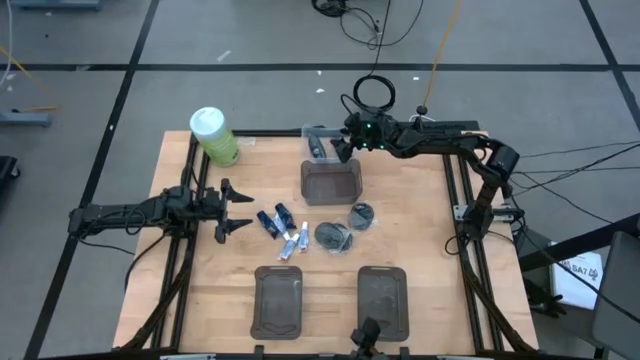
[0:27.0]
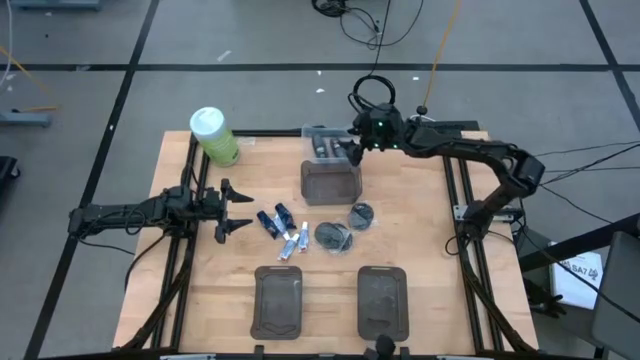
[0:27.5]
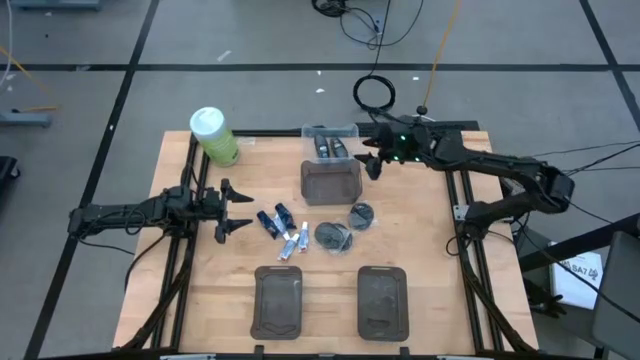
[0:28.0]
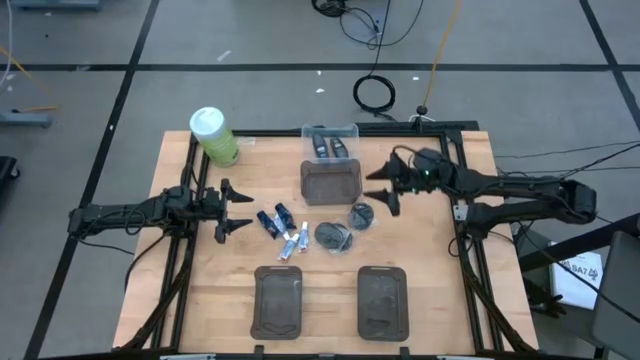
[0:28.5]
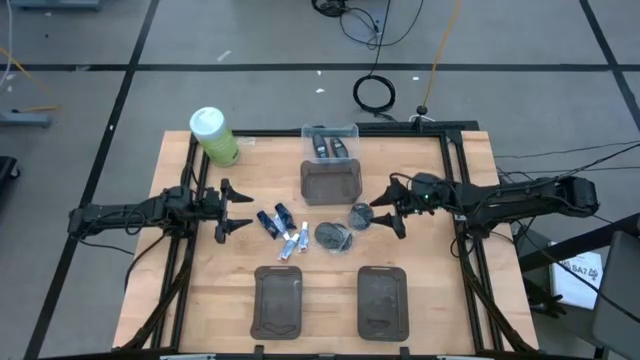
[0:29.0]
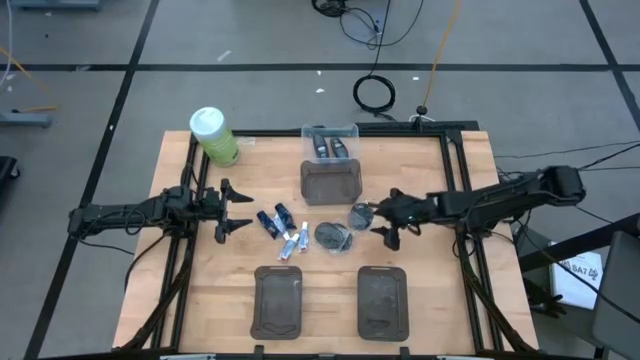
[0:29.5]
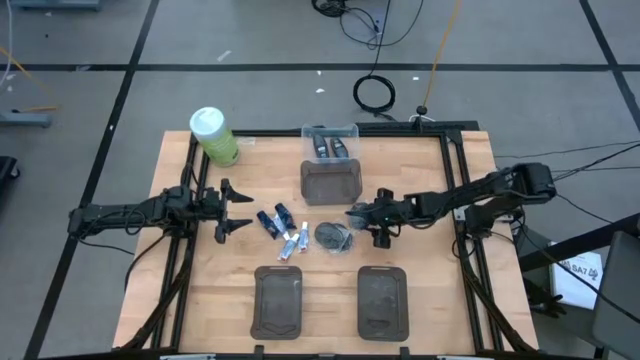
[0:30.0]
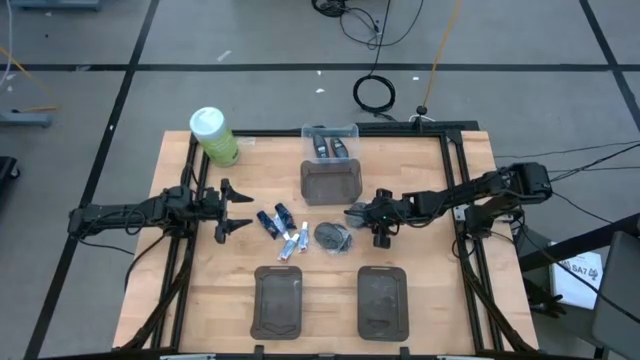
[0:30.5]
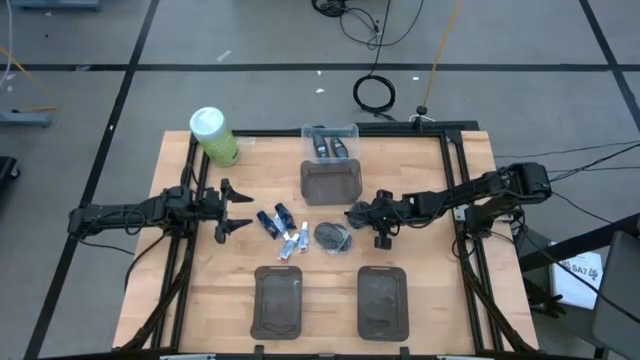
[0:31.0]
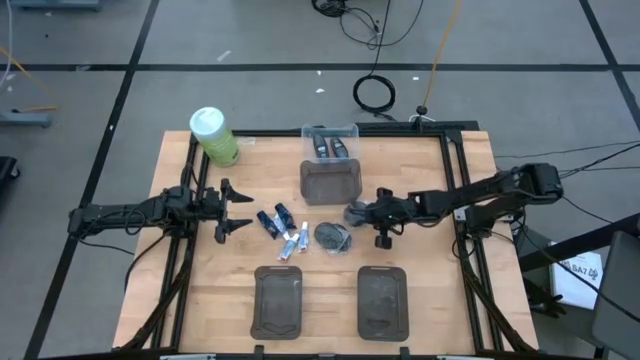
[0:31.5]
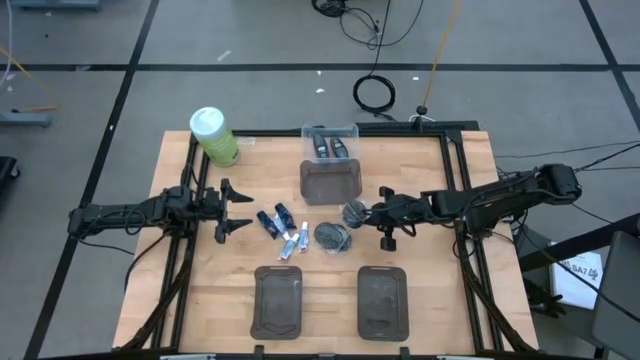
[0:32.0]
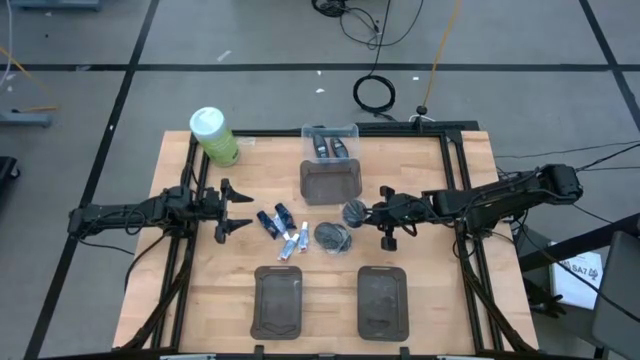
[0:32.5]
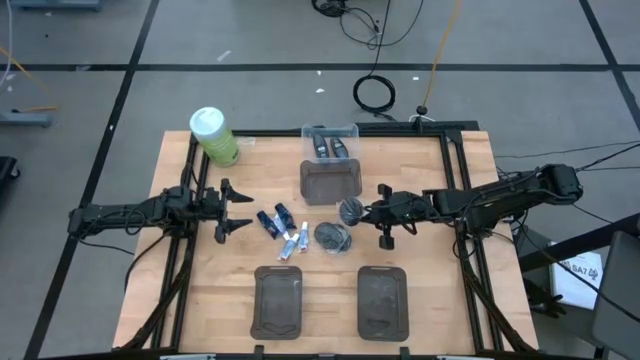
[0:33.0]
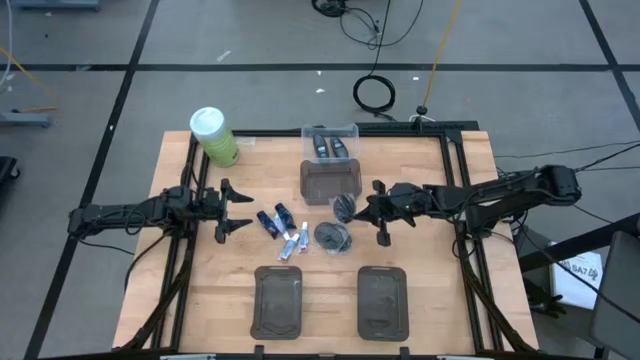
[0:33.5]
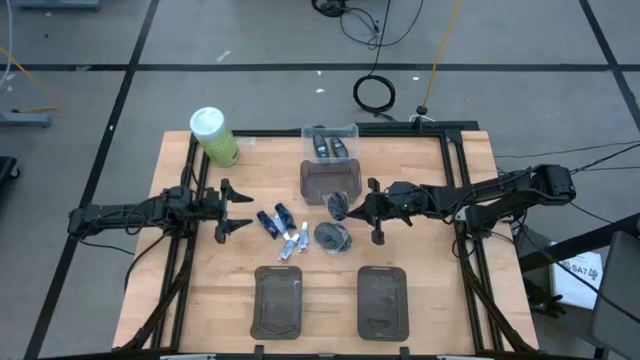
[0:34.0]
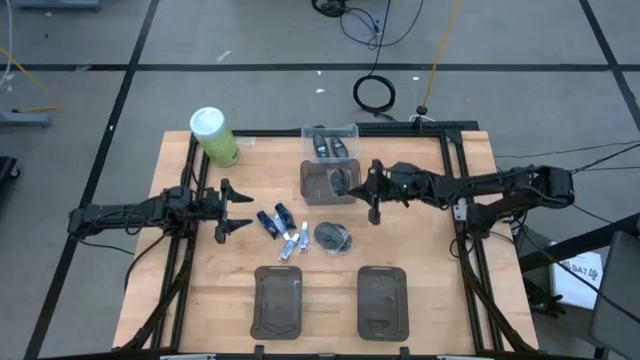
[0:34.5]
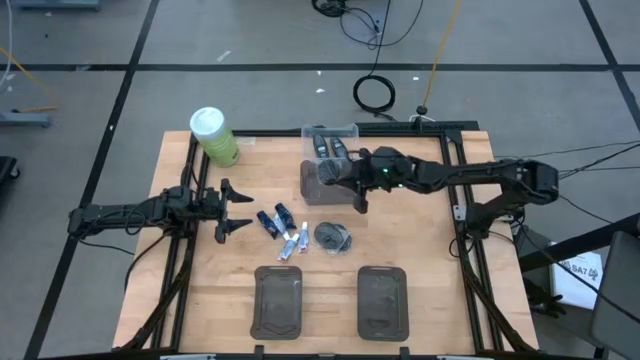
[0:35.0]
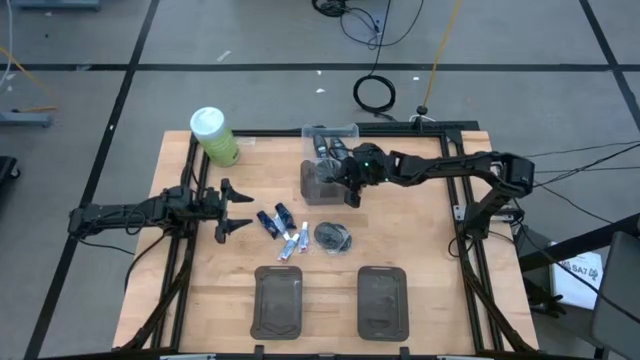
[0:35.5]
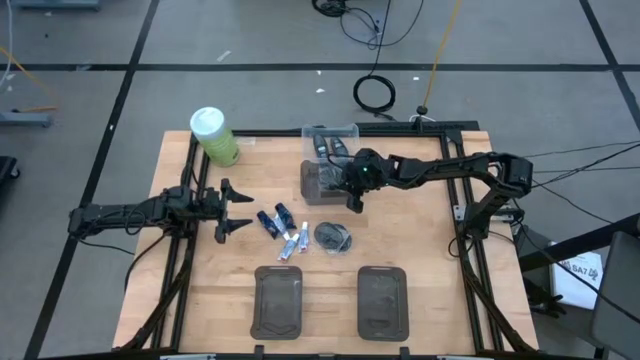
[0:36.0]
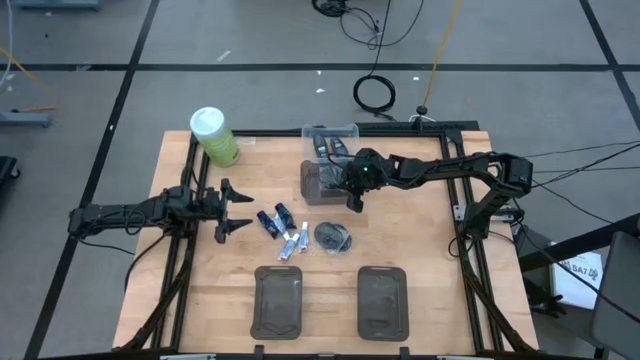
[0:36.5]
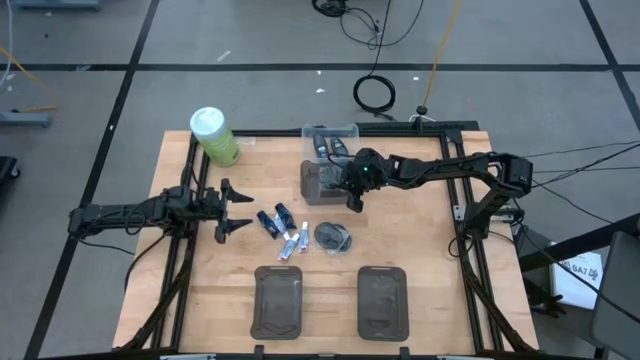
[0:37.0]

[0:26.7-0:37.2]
Task: Pick & Place Travel size toiletries
Put the right black hairbrush into the top black bin

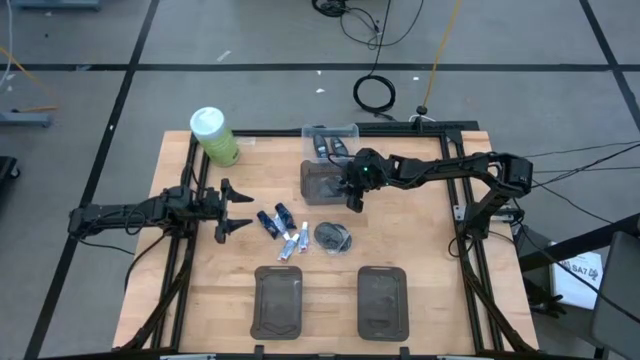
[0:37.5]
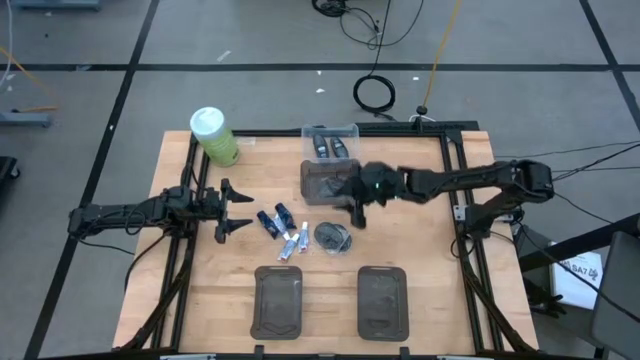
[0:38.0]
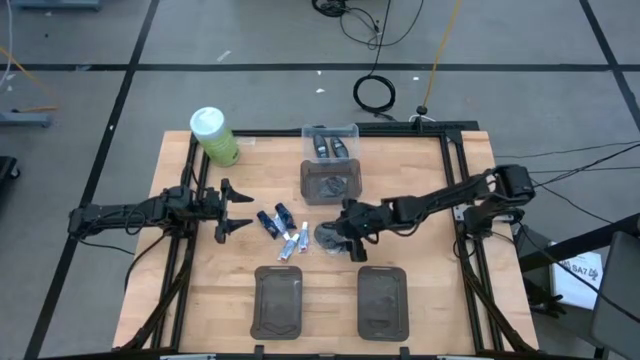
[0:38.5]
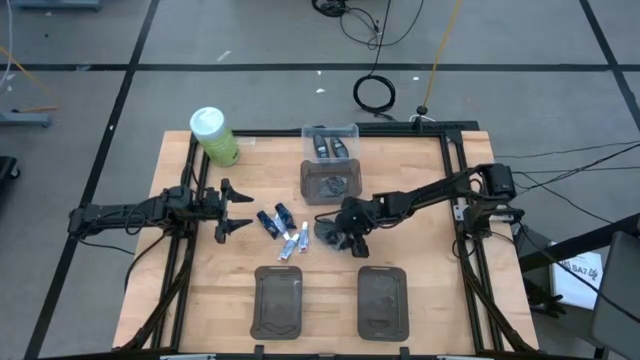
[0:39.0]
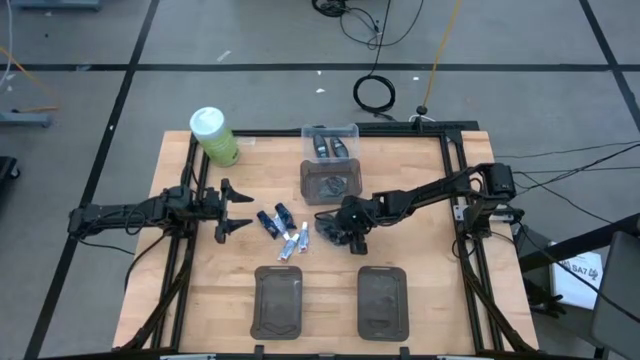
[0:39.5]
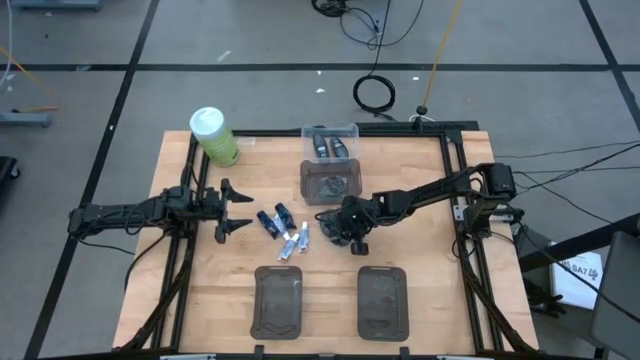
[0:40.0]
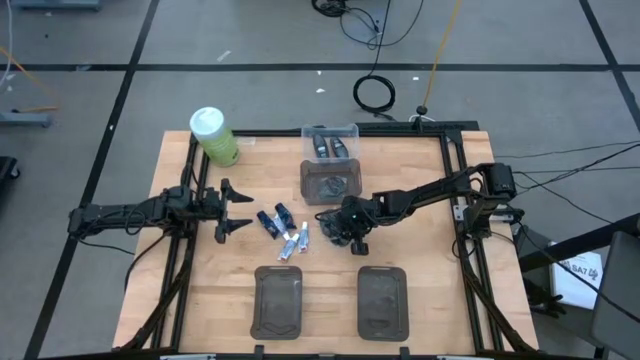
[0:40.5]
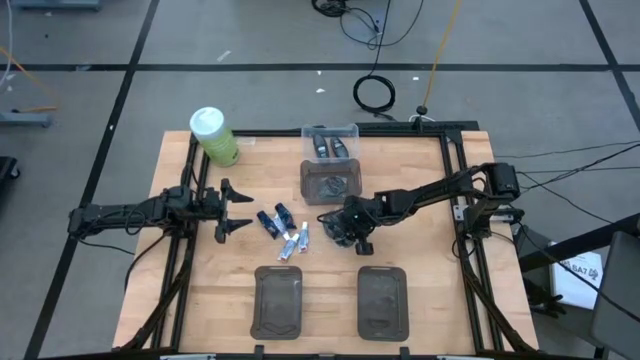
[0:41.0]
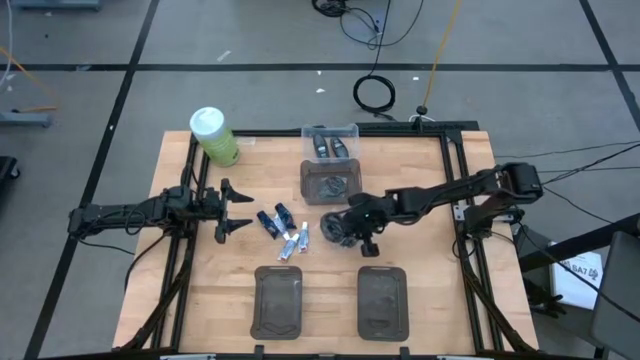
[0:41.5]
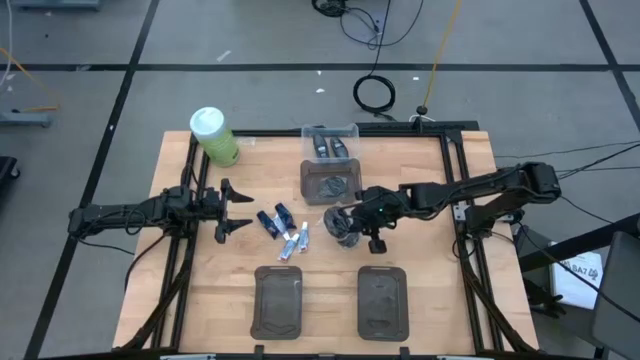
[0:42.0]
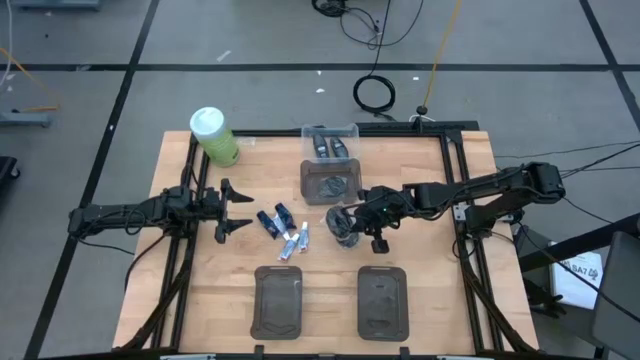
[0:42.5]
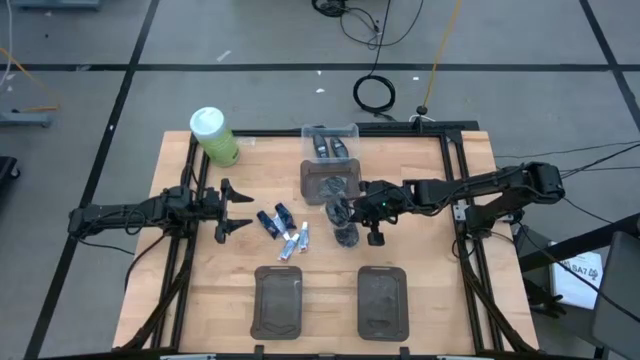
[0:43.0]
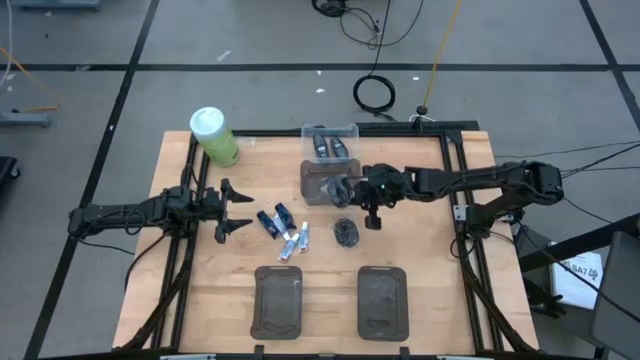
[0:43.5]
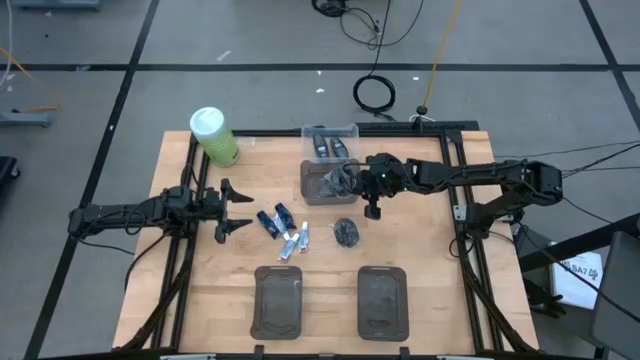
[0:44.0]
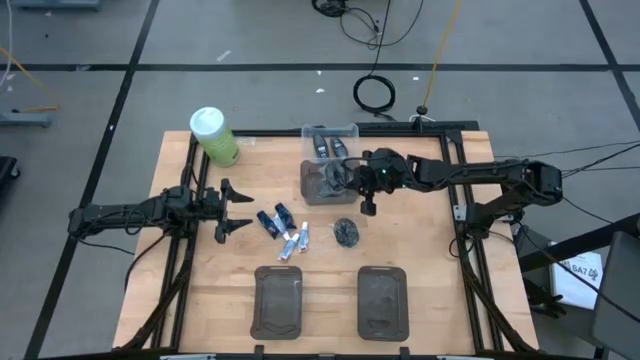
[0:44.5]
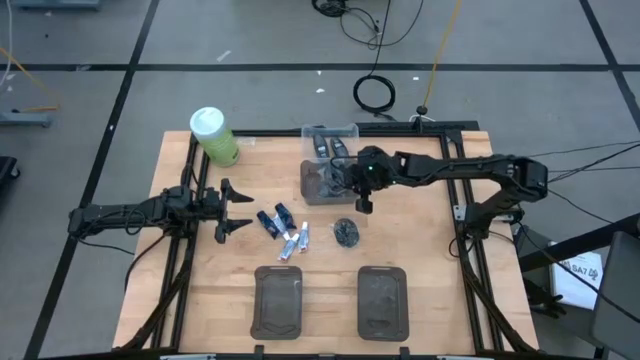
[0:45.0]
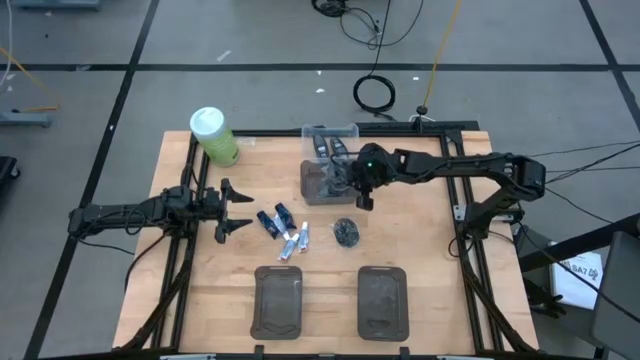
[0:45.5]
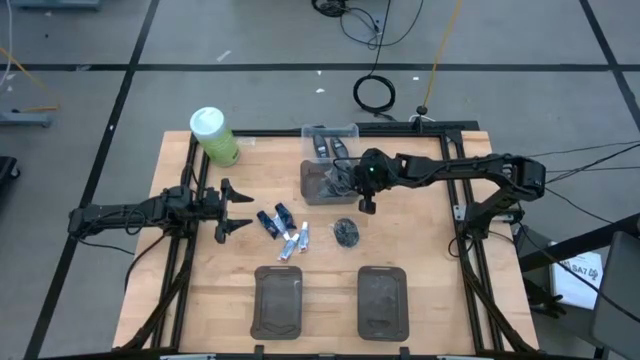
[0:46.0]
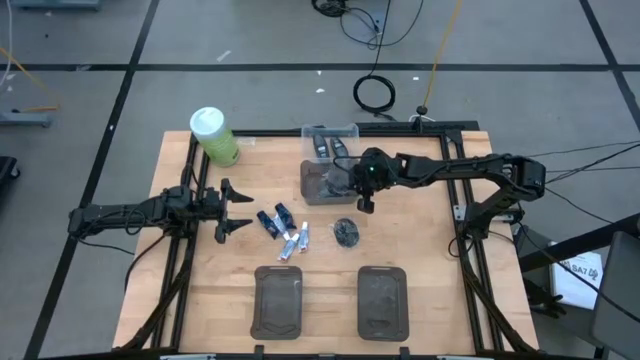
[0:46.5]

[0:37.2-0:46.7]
Put the left black hairbrush into the top black bin

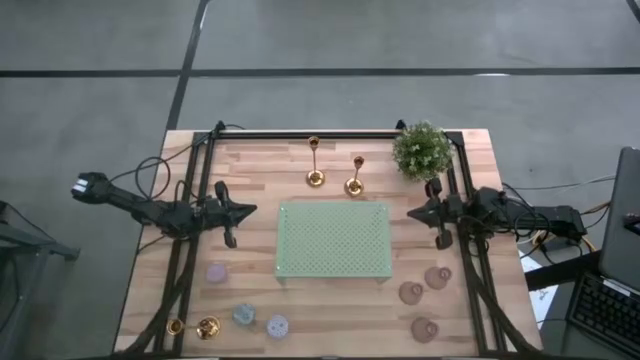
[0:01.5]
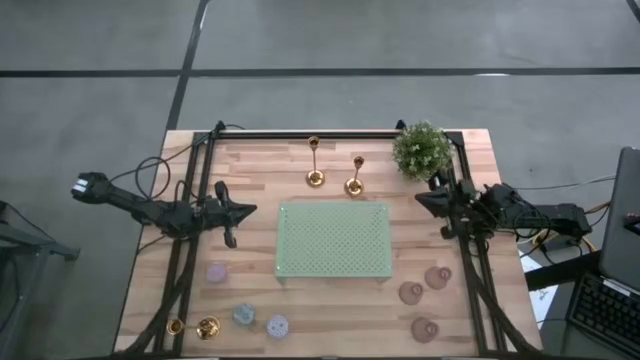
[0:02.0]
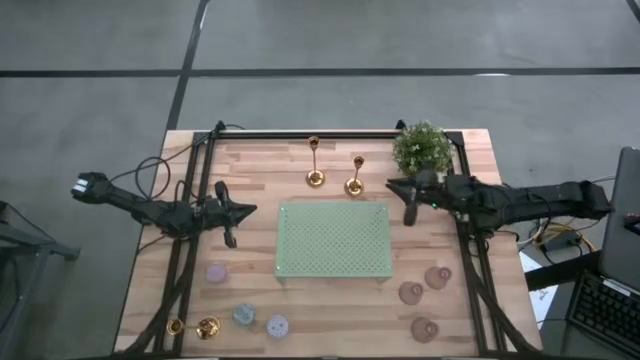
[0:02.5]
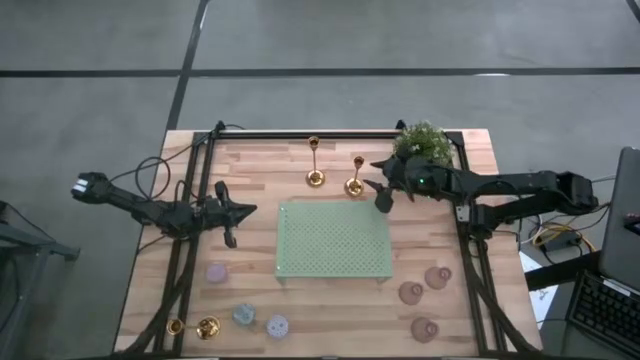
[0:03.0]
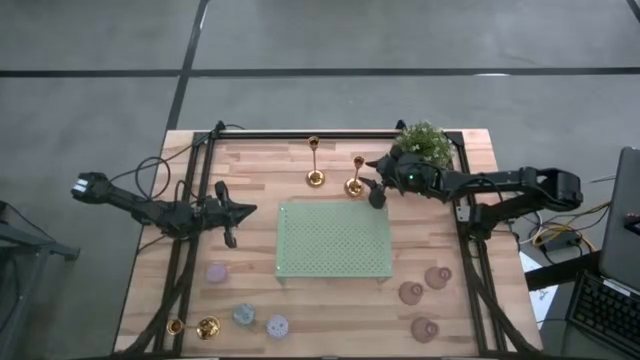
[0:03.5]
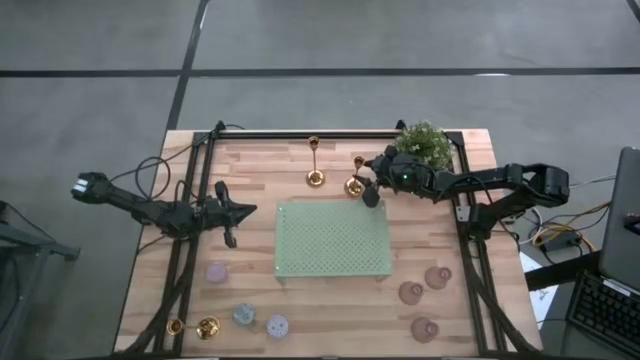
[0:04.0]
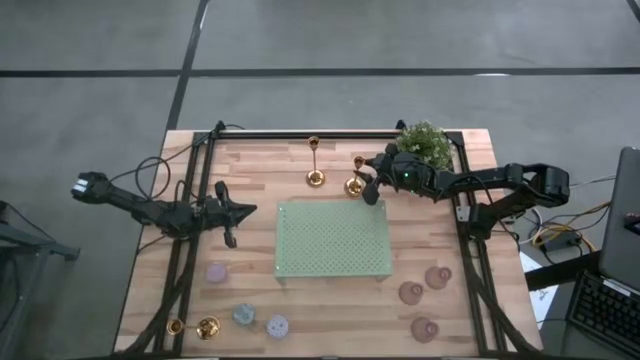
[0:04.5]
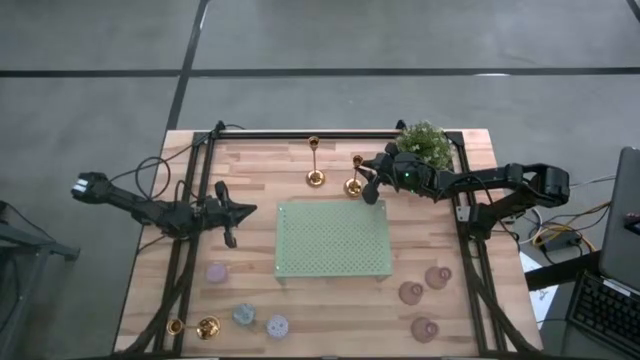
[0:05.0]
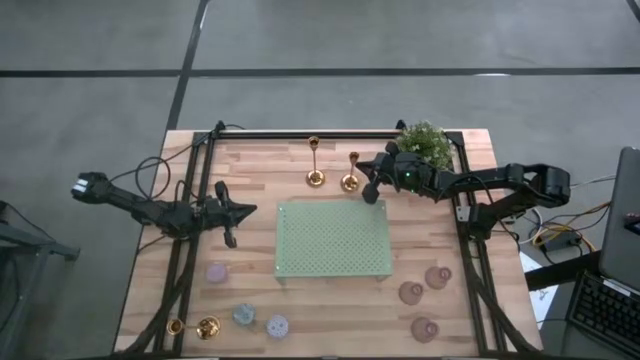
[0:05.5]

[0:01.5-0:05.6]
Task: Pick & Place candle stick holders
Put the top right gold candle holder on the shelf
